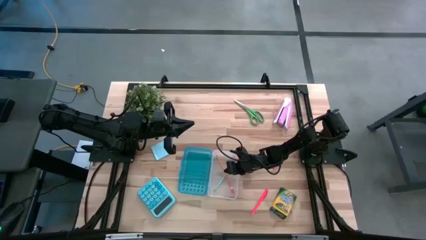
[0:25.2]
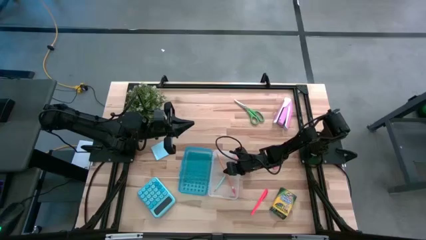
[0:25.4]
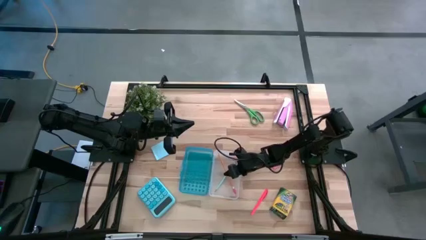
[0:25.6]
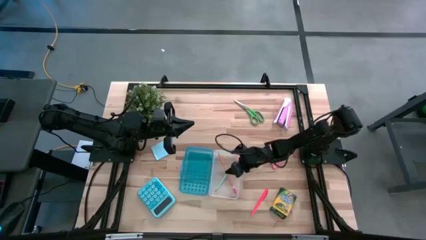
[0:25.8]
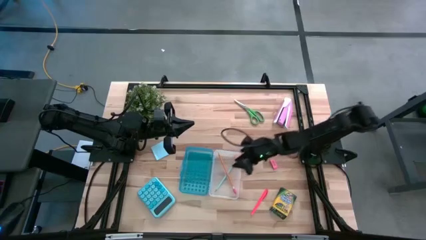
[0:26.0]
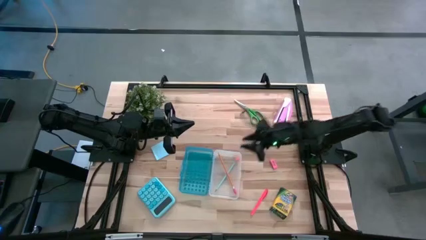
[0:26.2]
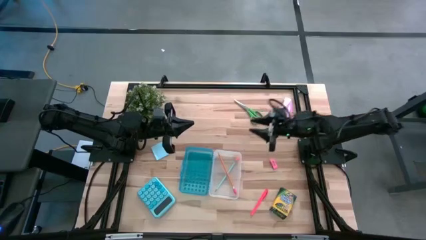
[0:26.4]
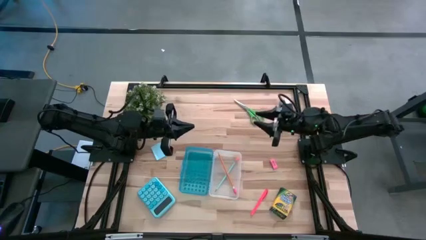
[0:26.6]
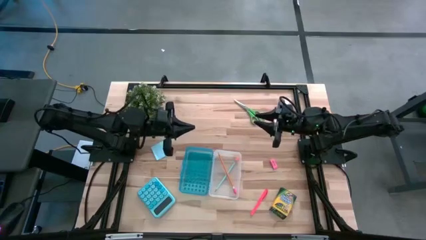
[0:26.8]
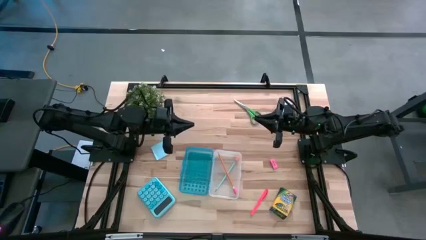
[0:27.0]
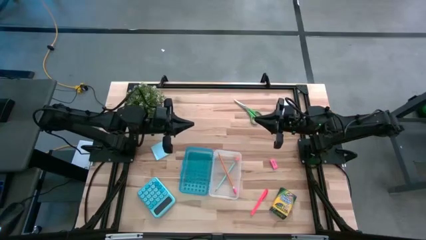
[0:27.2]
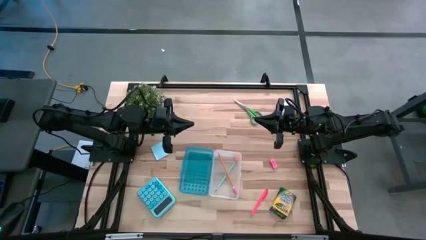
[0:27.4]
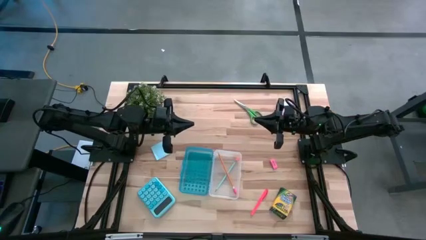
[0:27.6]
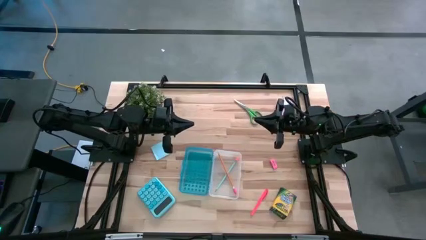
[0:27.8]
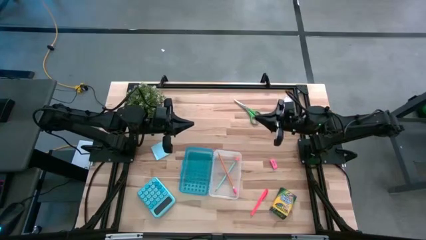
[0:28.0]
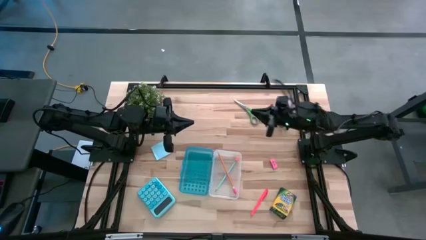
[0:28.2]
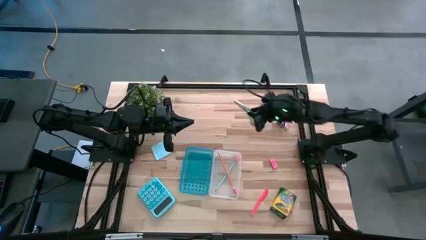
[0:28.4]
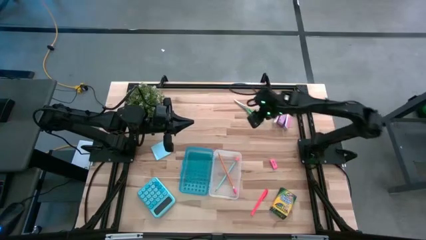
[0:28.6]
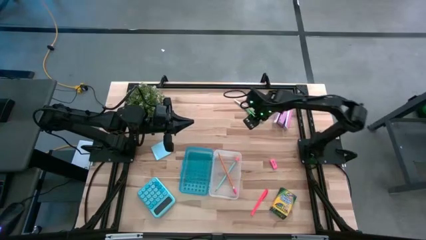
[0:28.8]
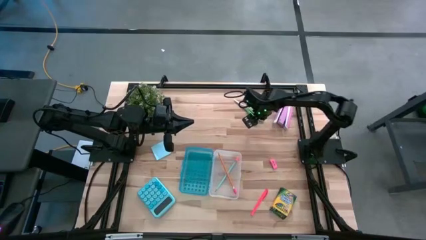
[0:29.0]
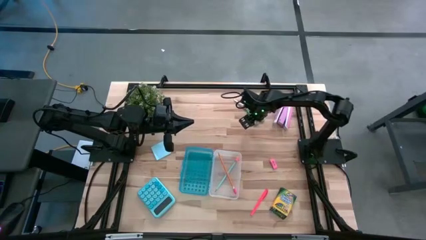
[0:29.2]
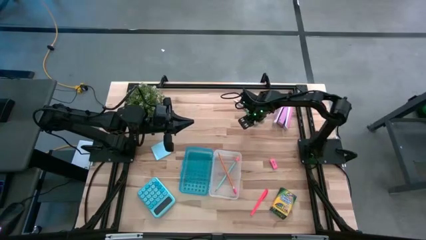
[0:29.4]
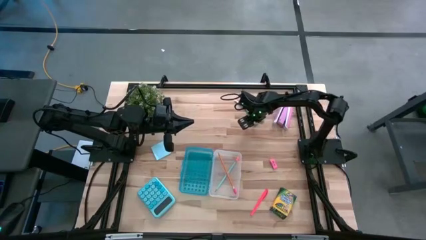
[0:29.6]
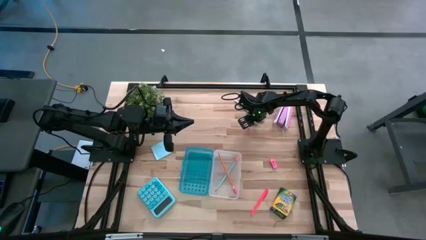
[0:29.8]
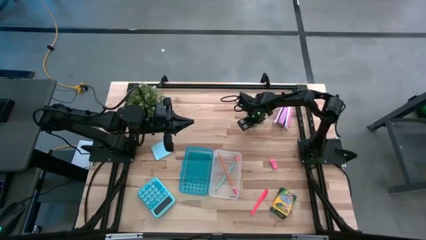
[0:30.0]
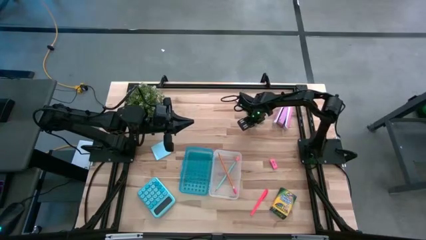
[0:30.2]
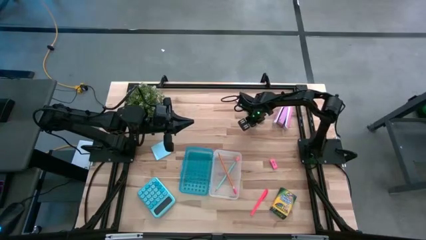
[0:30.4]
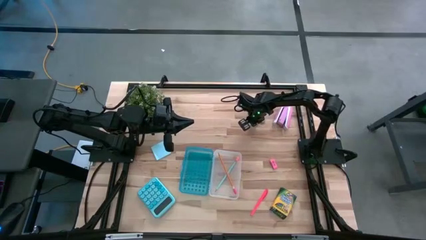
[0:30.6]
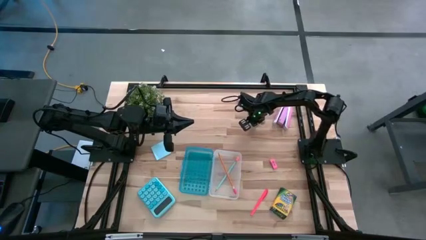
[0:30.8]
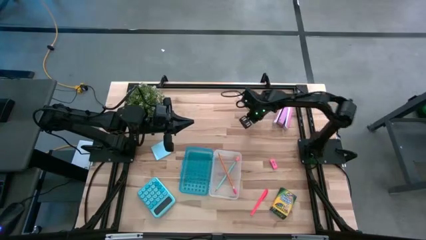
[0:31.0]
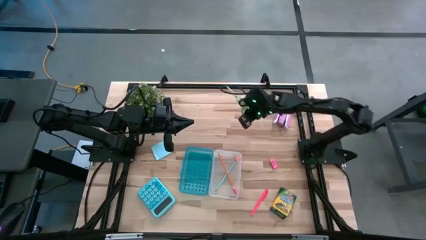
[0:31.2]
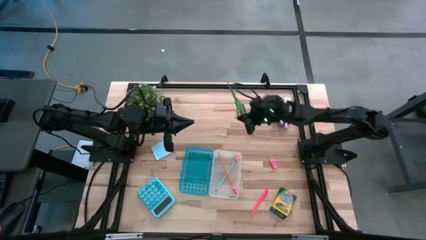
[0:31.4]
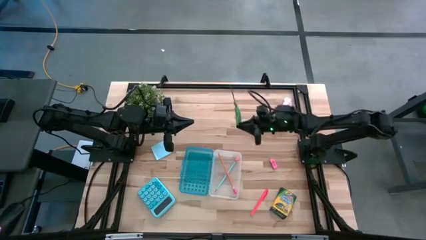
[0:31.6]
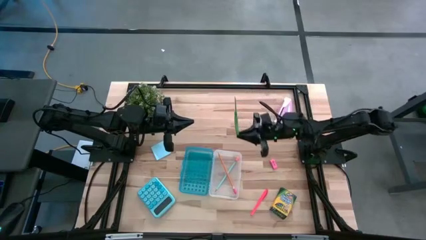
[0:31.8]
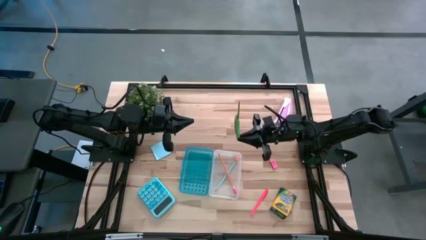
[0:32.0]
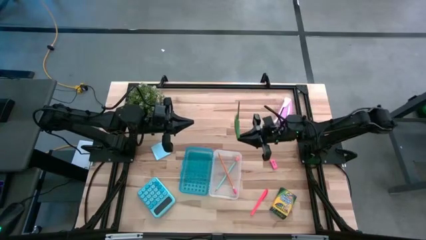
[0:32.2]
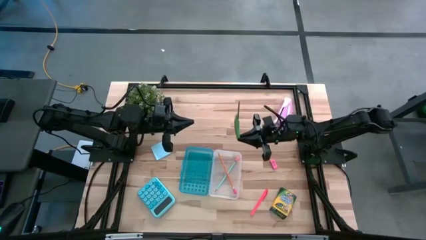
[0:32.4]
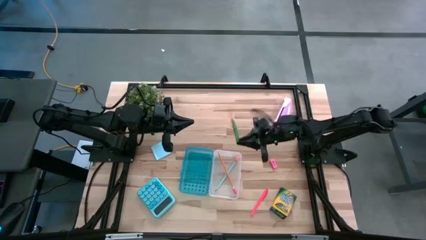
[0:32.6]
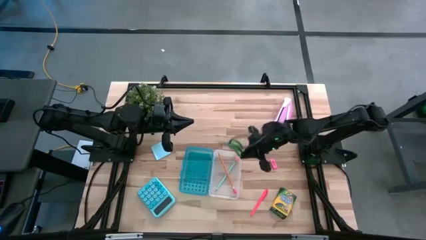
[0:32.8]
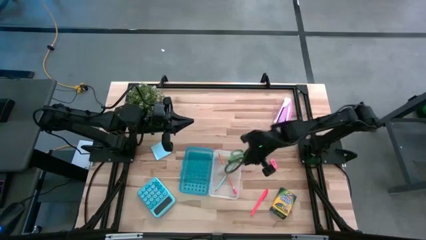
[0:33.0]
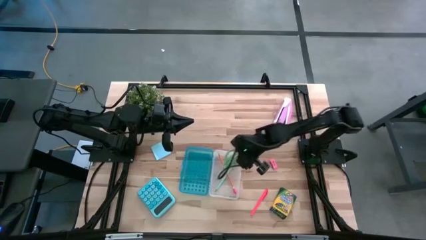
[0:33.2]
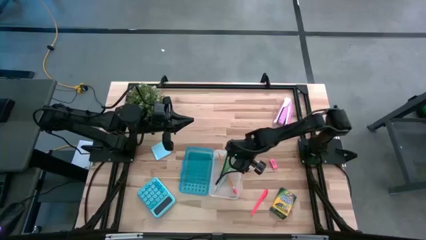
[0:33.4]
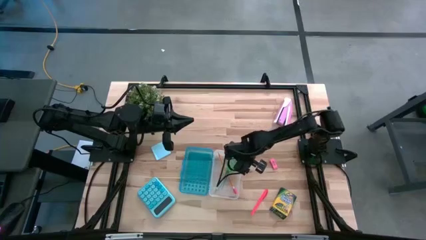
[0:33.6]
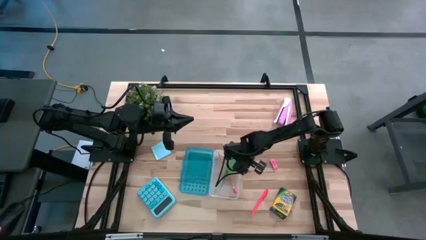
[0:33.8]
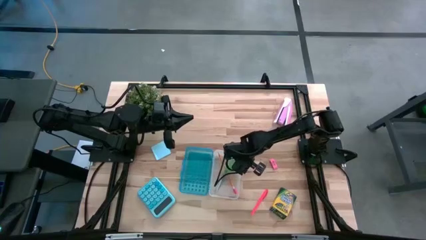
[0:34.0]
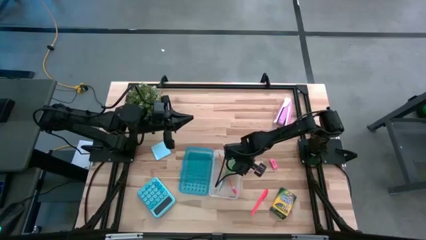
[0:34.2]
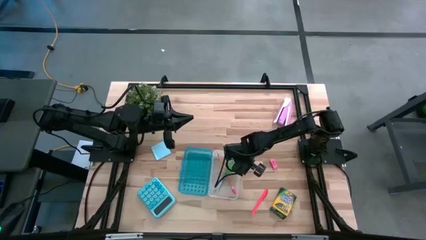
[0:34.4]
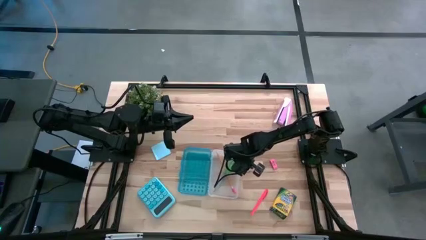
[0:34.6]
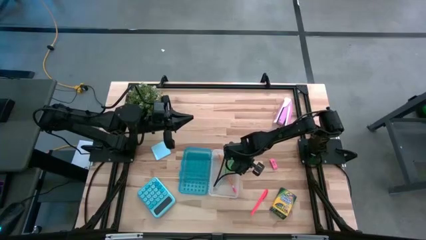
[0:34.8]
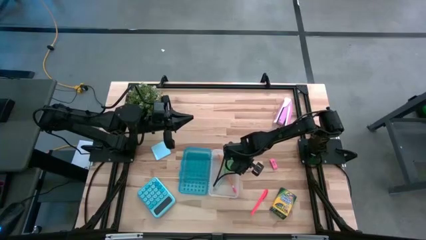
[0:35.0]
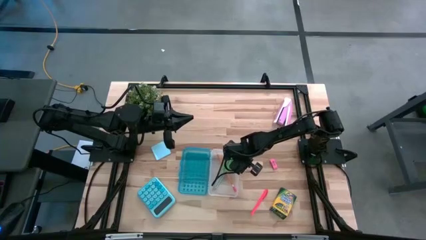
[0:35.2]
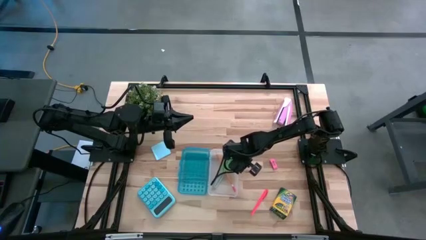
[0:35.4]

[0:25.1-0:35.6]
Task: Pack school essentials
Put the green scissors into the blue supply box

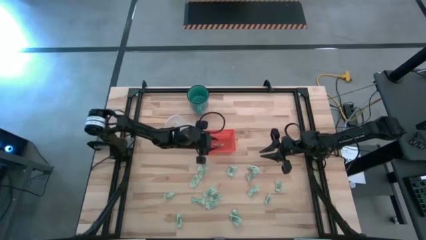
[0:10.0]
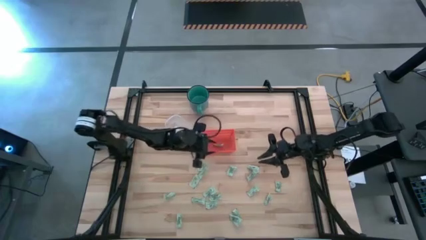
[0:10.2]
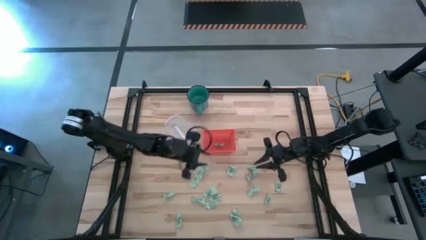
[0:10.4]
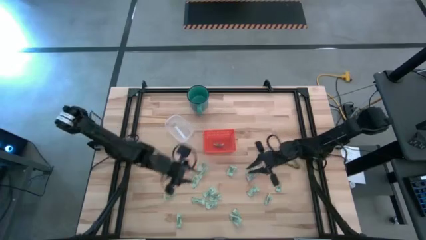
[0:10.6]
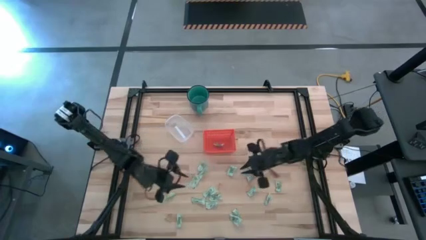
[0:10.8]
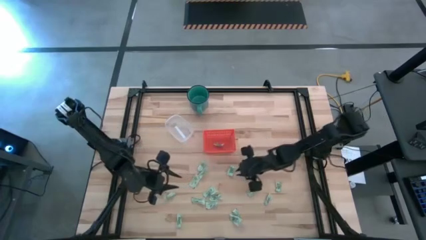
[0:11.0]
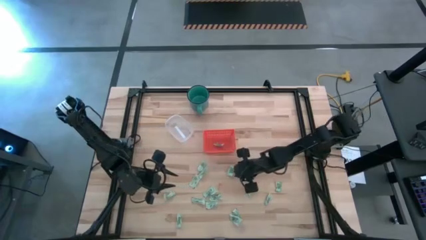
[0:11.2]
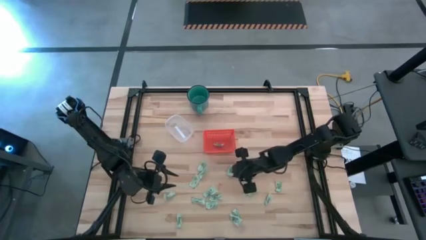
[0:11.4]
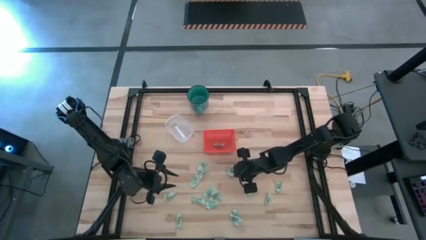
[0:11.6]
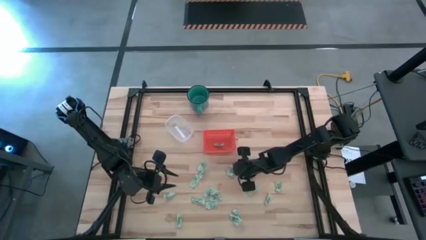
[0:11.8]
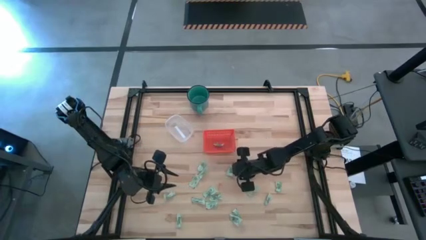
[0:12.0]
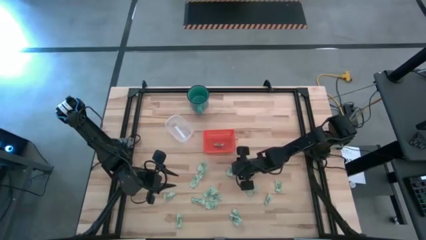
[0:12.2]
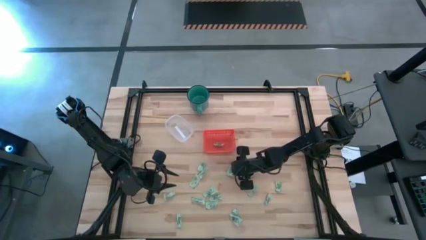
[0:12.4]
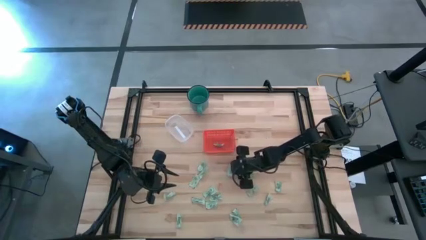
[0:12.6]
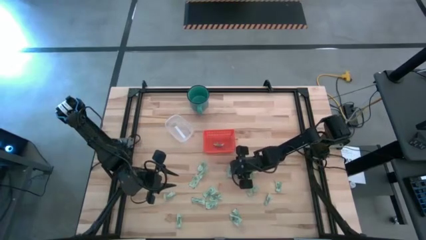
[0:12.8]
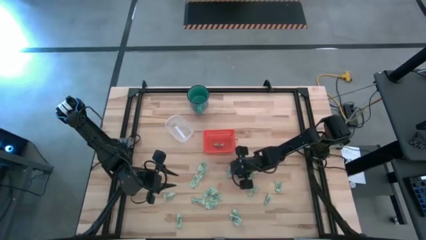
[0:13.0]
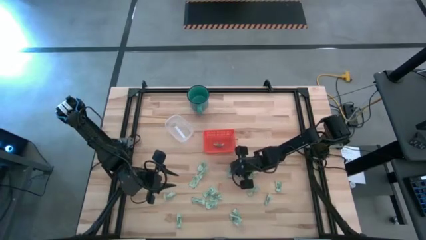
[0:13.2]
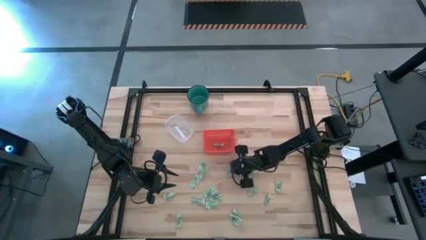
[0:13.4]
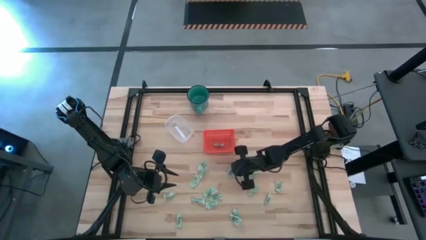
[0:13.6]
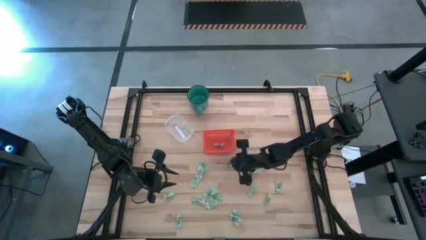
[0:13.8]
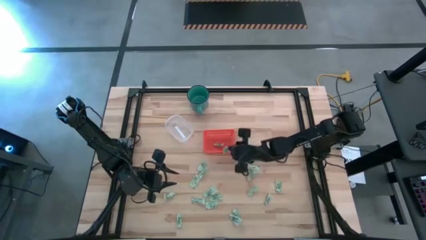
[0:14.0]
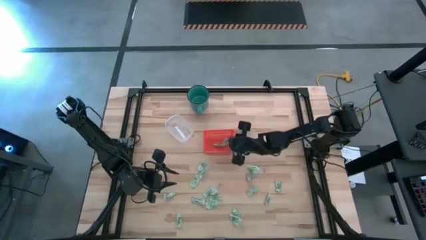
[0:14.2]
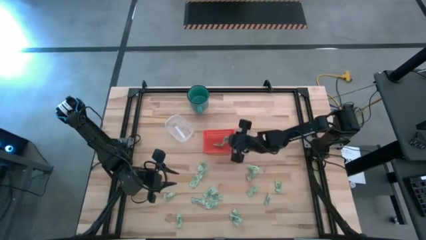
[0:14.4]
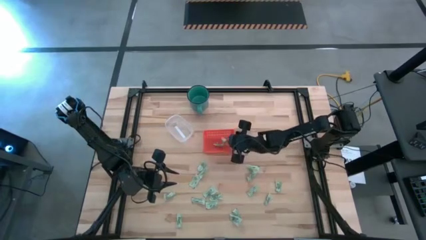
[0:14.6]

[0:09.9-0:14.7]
Task: Pick and place items into bin
Put the stevia packet into the orange bin

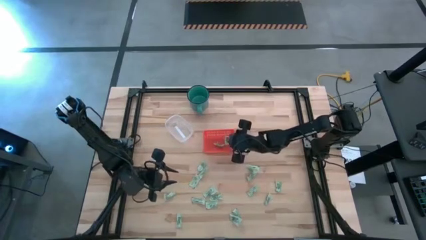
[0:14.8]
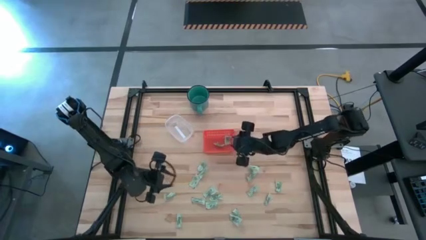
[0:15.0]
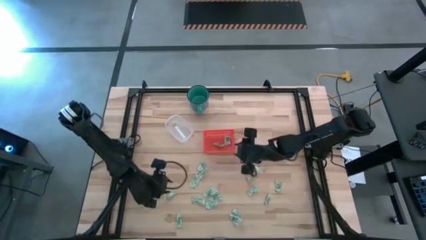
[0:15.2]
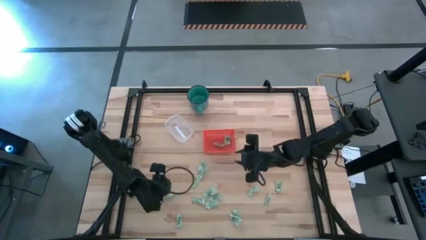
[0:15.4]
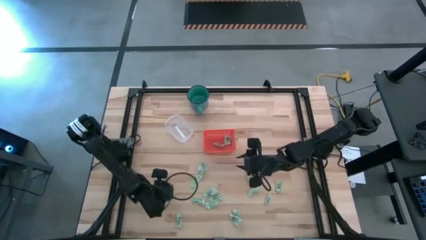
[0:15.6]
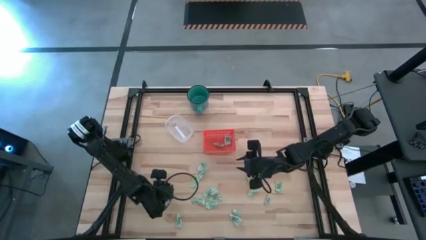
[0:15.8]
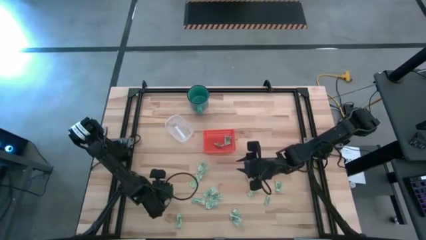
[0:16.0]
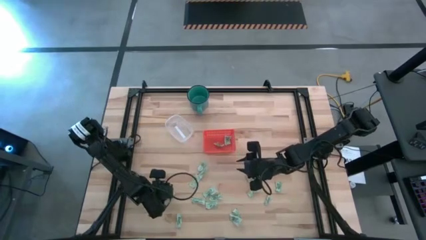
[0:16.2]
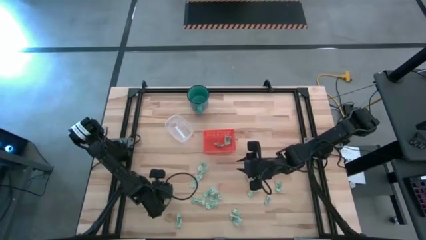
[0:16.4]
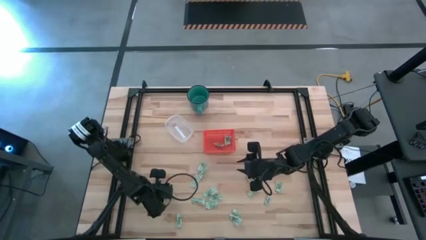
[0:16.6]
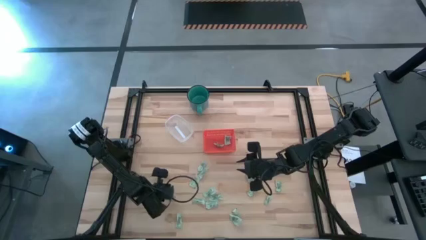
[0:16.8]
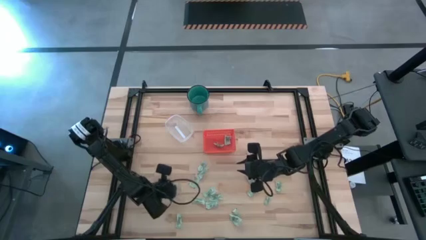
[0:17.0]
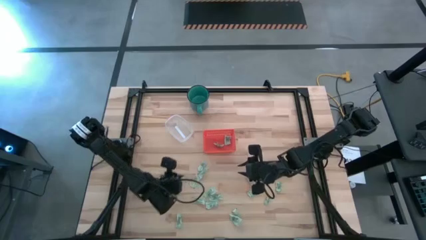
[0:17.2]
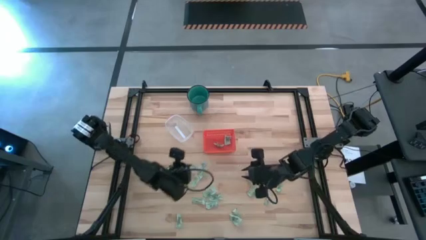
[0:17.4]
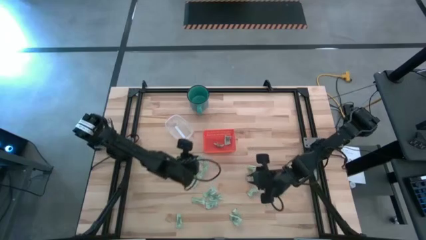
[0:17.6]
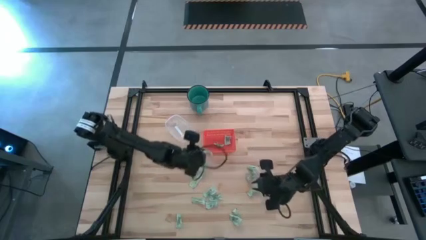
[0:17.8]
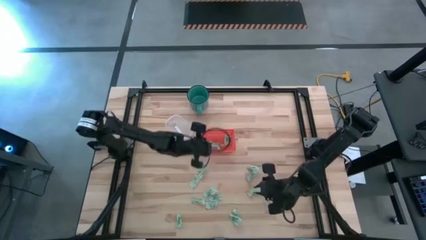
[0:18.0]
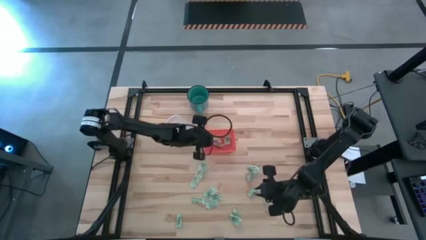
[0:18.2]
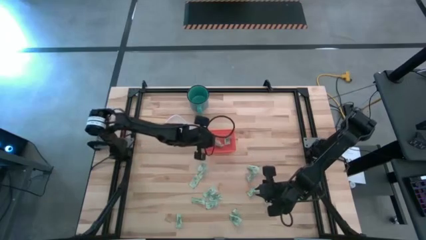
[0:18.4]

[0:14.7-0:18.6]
Put the stevia packet into the orange bin
